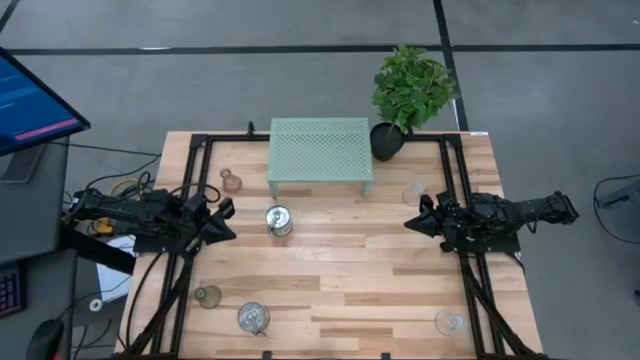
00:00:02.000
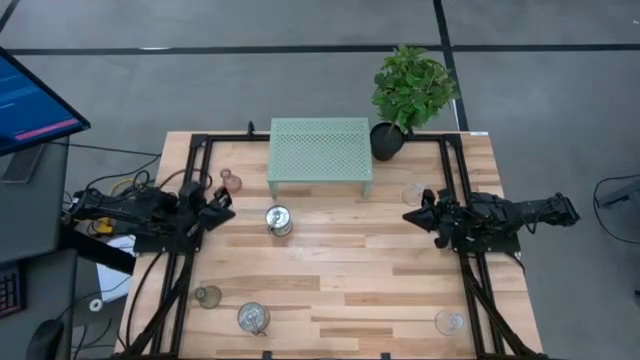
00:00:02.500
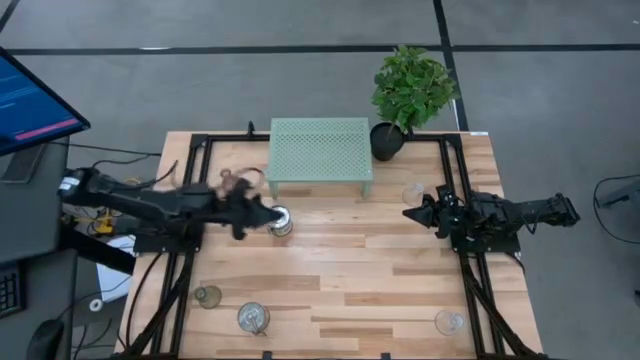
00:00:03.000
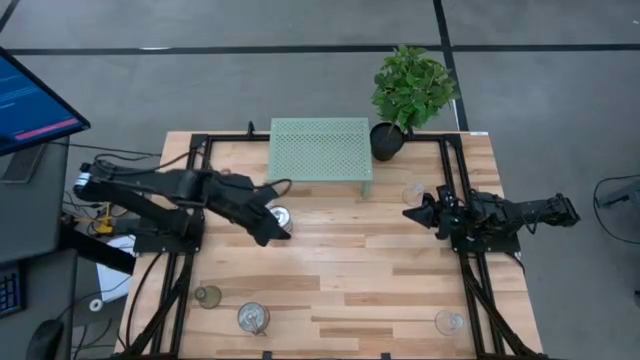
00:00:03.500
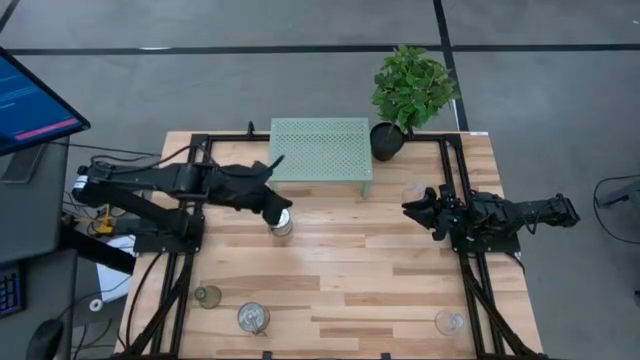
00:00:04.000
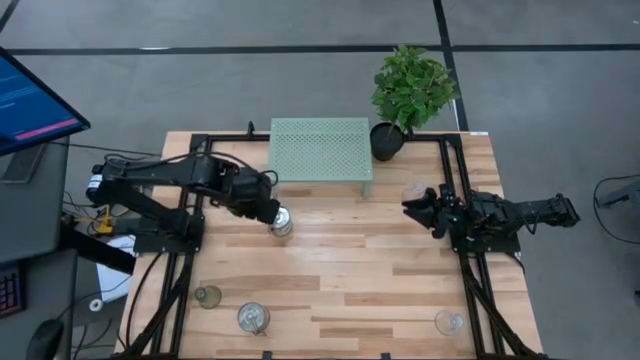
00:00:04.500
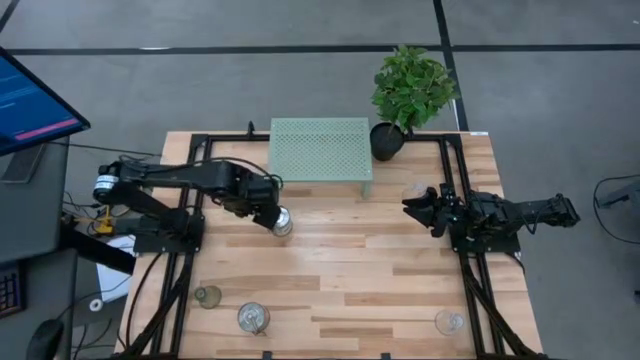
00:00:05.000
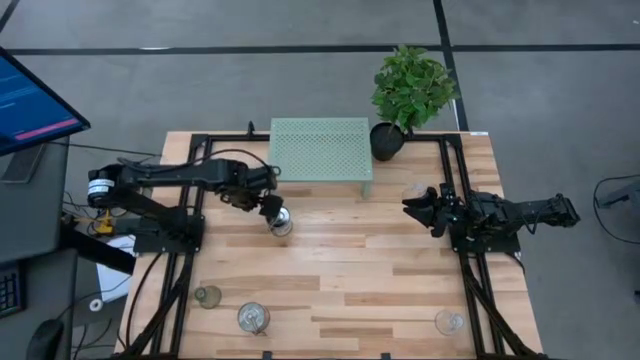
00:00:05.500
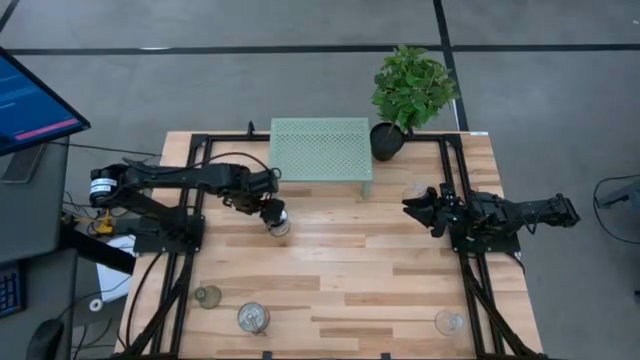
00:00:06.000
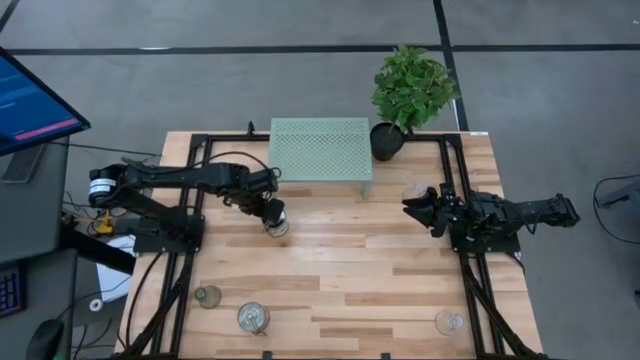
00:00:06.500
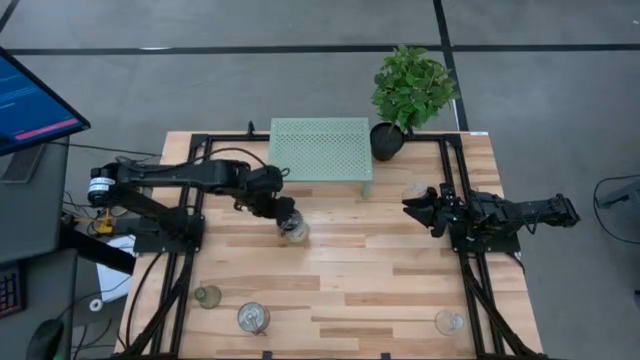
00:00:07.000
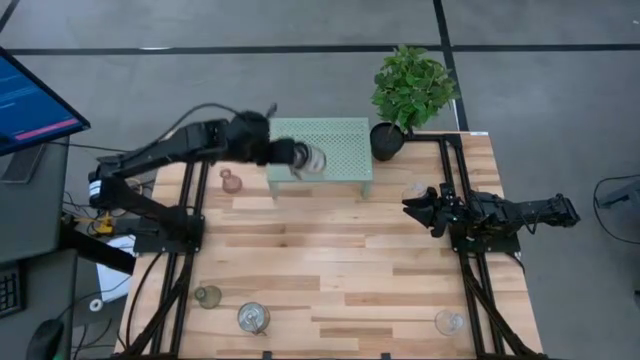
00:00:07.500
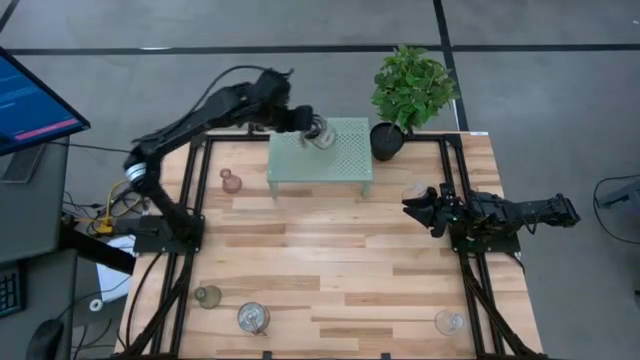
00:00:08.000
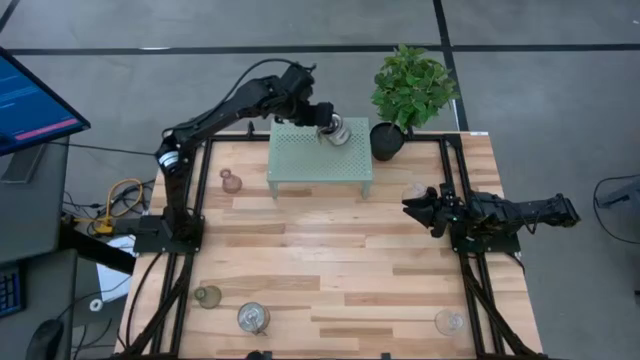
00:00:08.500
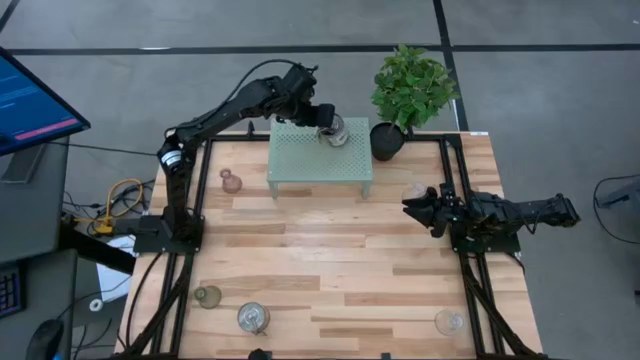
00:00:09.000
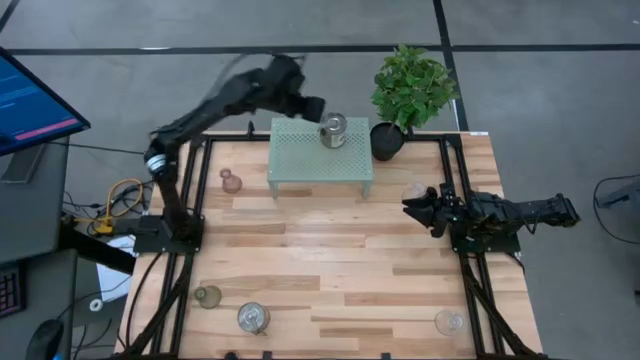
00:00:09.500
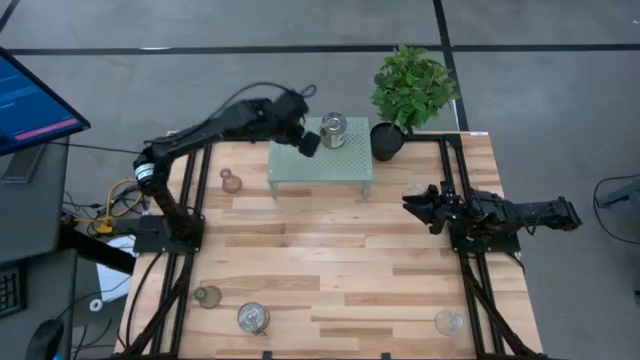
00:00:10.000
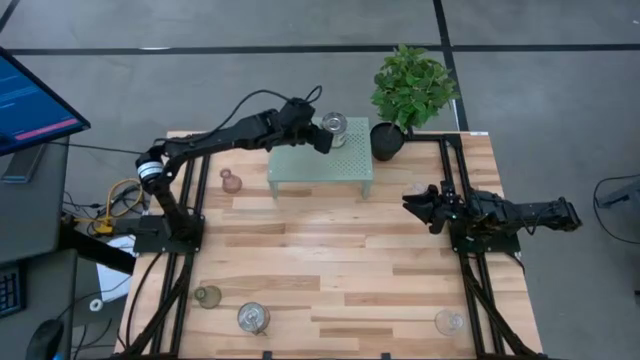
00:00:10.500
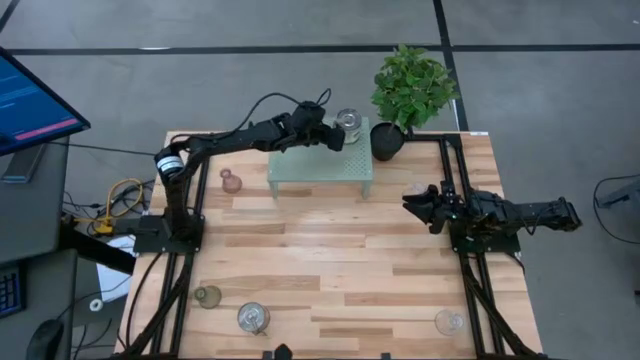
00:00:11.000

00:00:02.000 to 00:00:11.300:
Task: Pick & Place candle stick holders
Put the top scented candle on the shelf

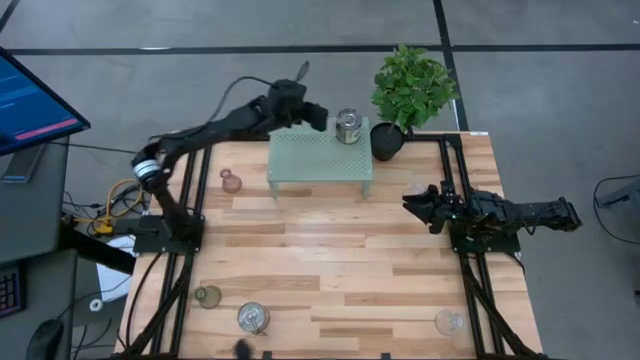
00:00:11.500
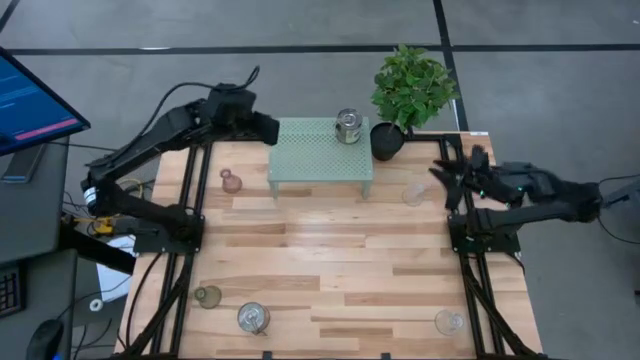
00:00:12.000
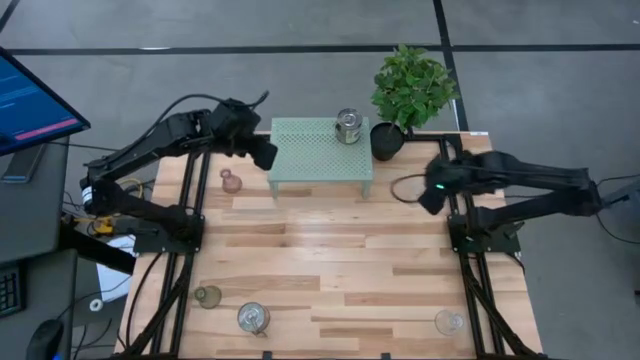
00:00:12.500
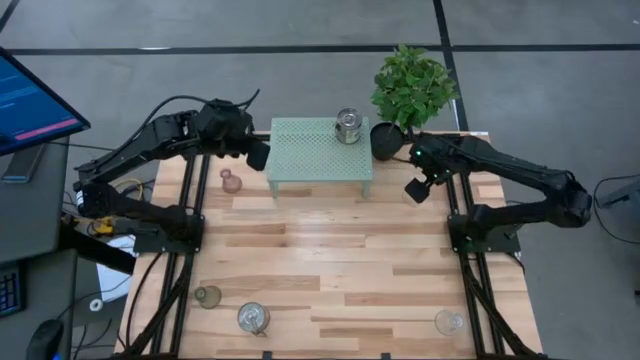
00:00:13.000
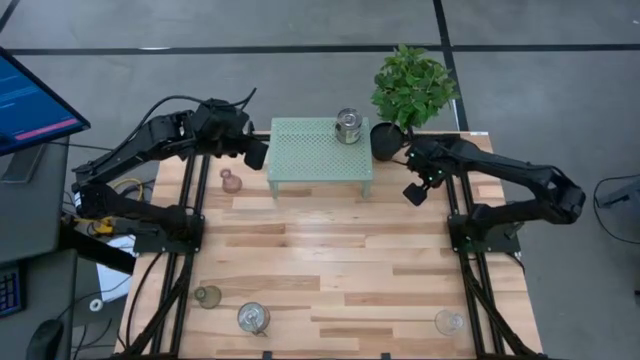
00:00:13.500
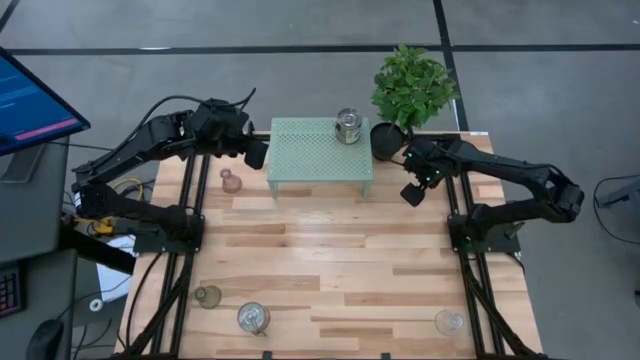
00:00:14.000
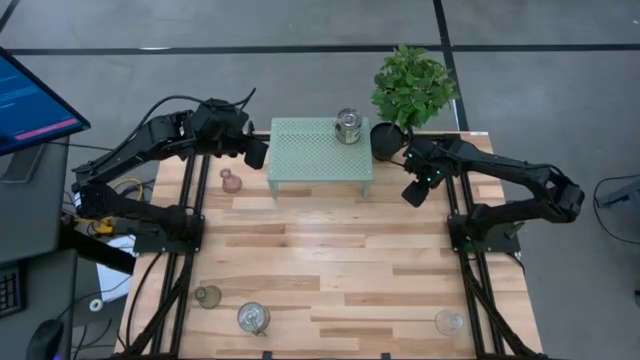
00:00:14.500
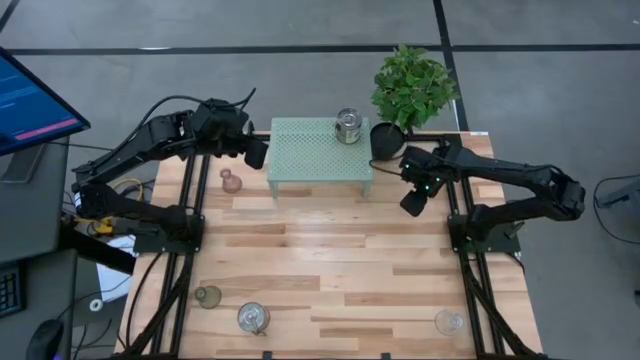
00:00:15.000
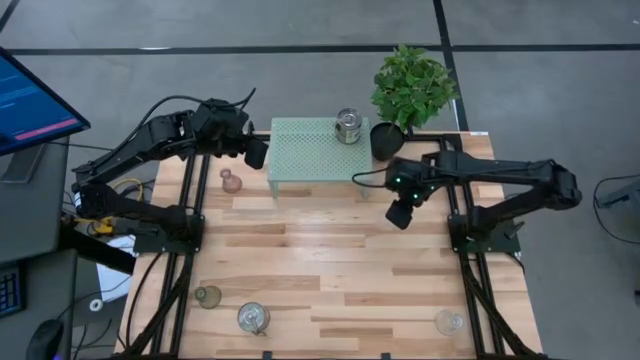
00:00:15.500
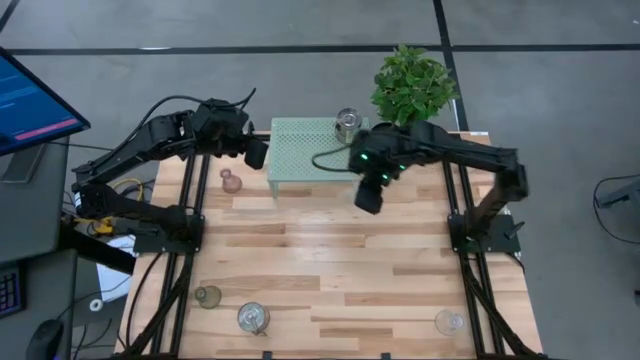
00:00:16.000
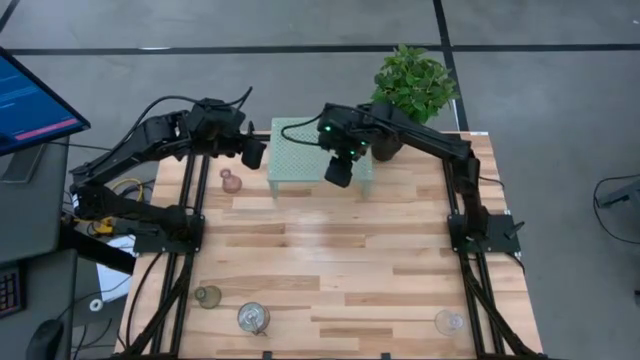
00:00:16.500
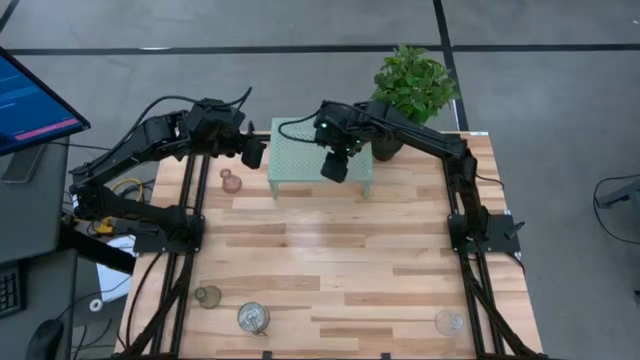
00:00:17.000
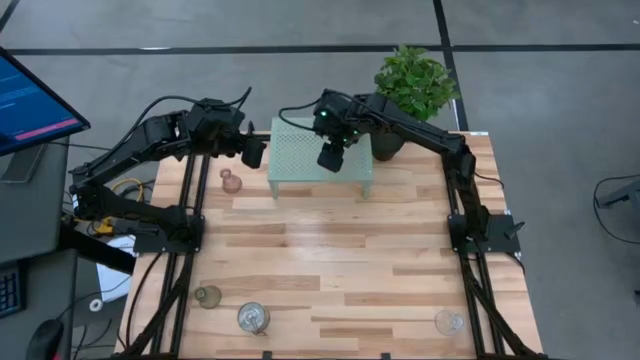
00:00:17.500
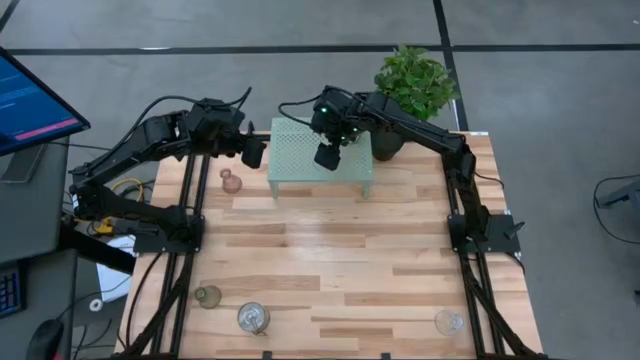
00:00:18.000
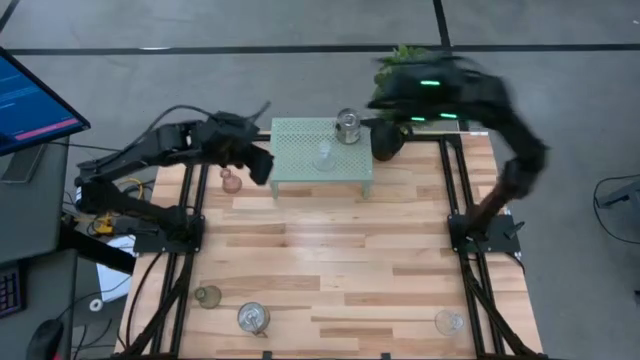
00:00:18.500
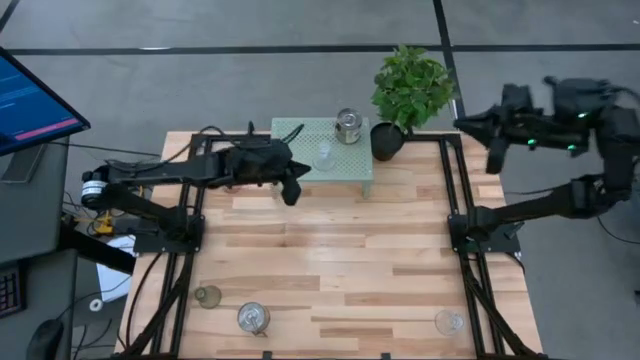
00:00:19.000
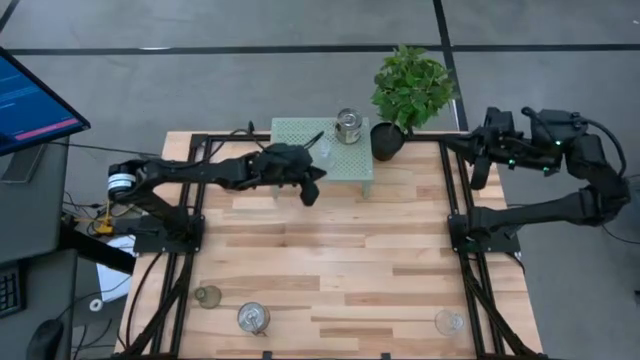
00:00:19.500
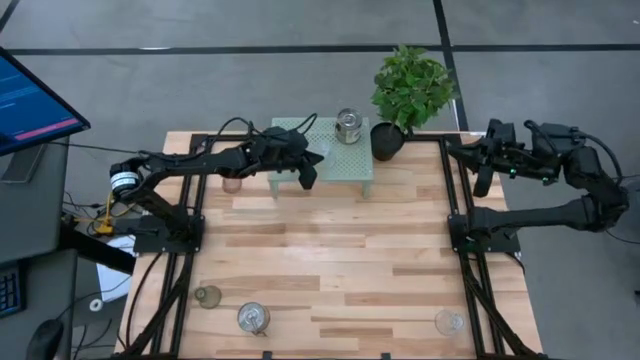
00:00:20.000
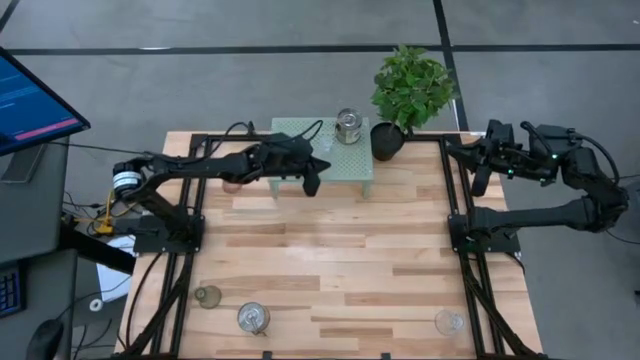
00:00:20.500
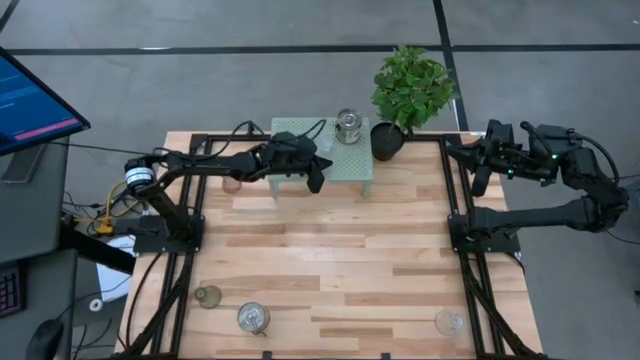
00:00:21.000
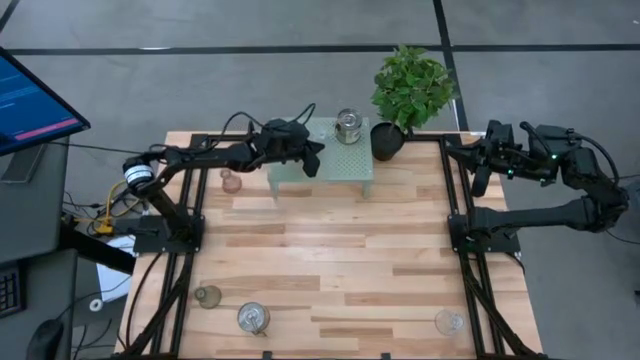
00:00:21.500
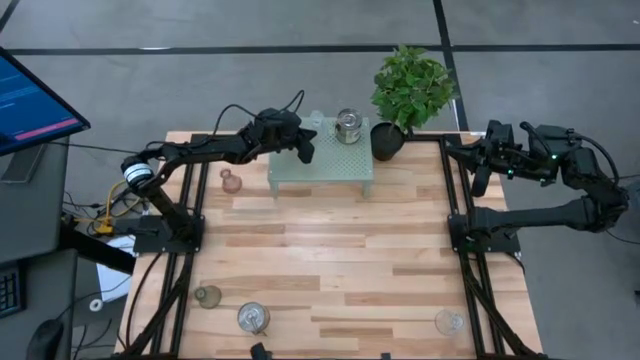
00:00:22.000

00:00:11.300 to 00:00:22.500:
Put the top transparent vase on the shelf

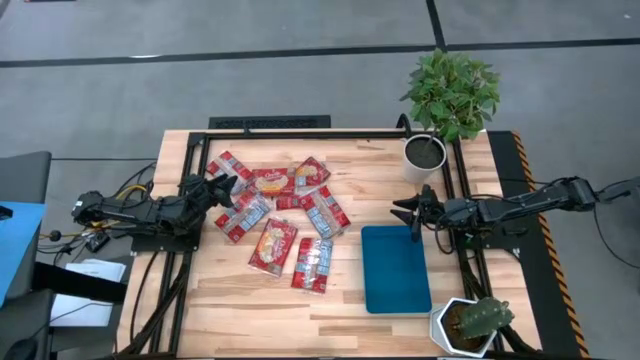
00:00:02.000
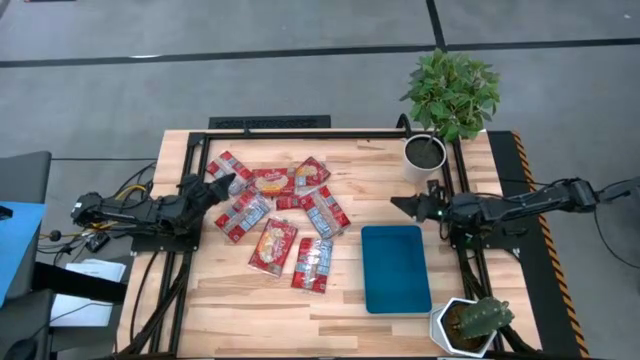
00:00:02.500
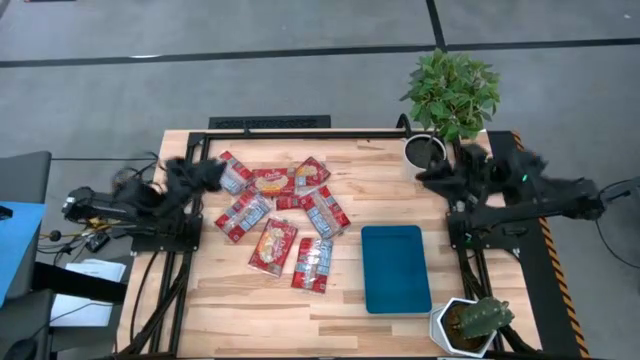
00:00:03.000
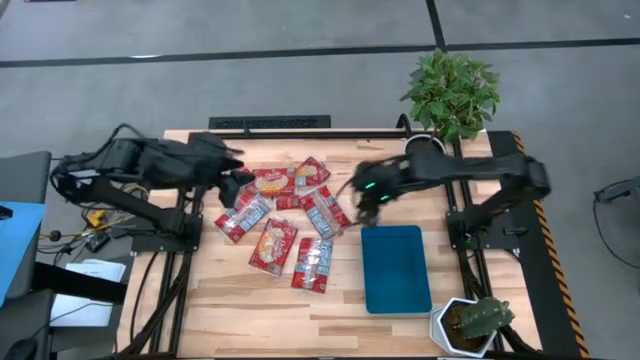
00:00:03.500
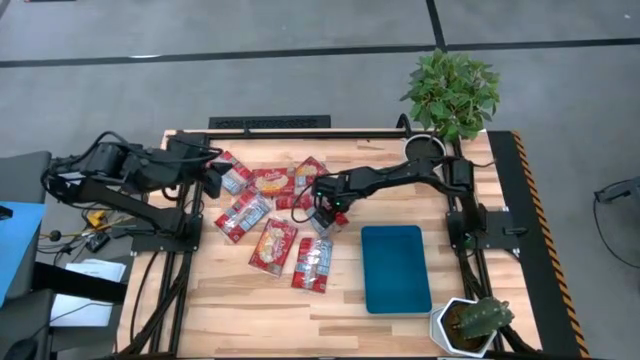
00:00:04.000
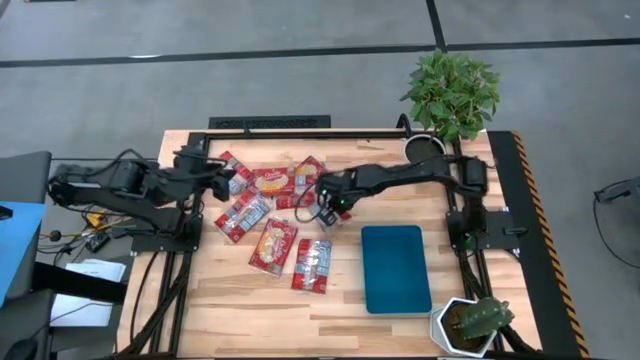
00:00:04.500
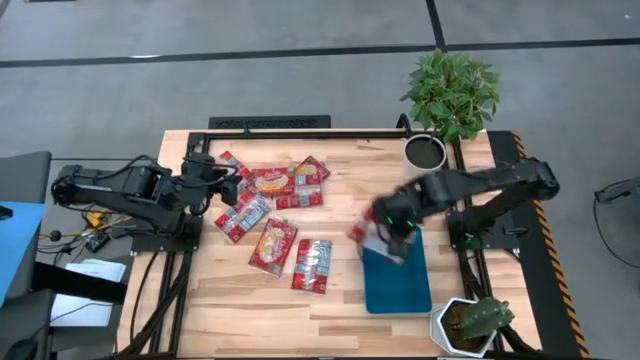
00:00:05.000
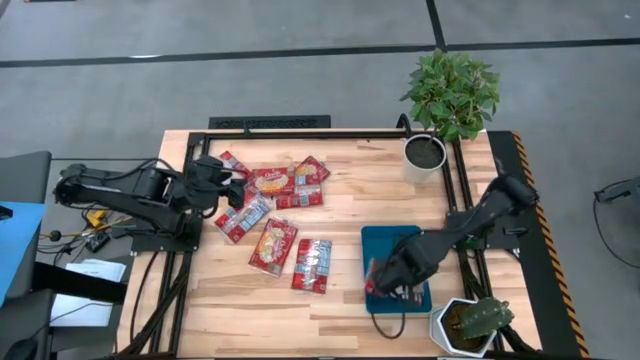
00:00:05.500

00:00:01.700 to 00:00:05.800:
Task: Sort popcorn bags into baskets
Put the red popcorn bag into the blue bin
